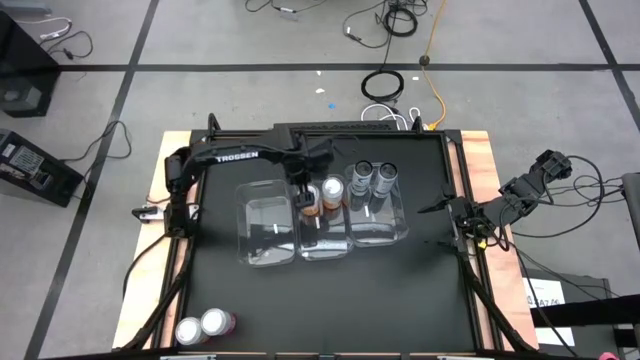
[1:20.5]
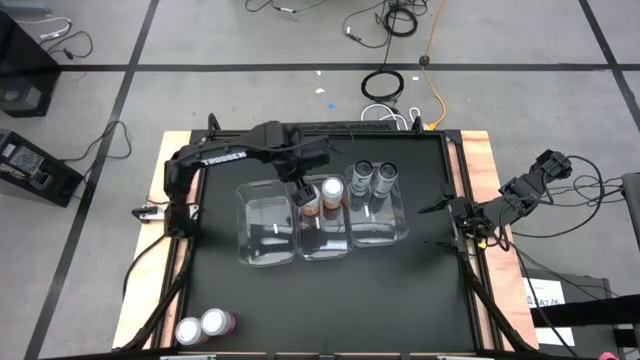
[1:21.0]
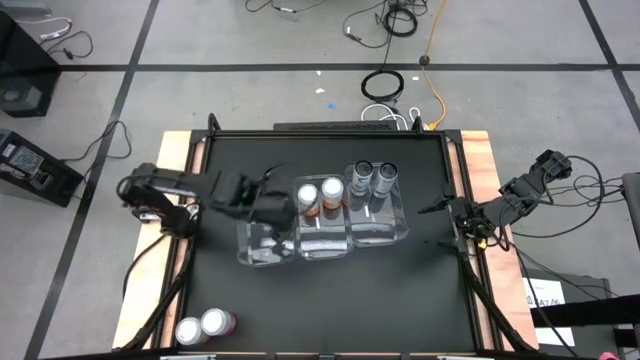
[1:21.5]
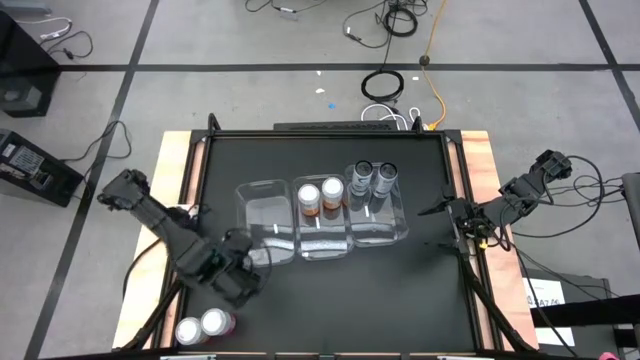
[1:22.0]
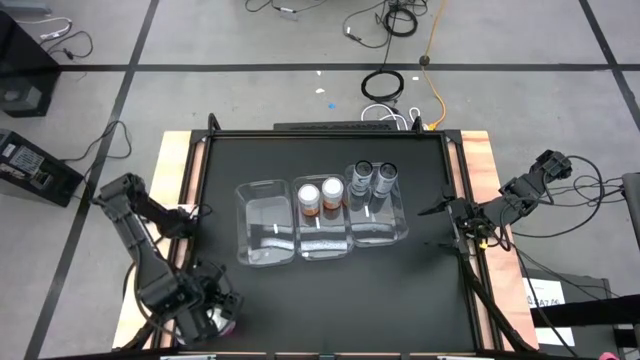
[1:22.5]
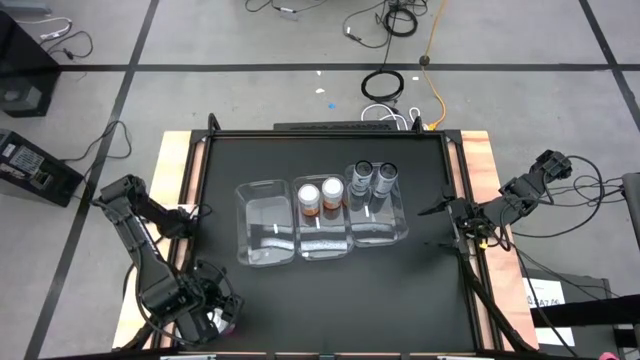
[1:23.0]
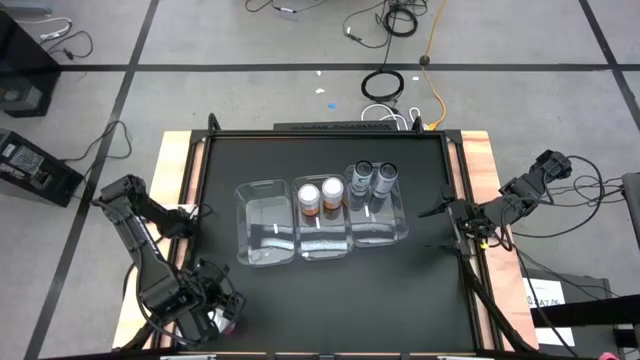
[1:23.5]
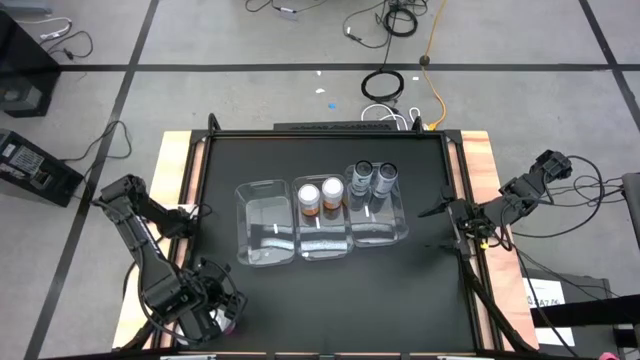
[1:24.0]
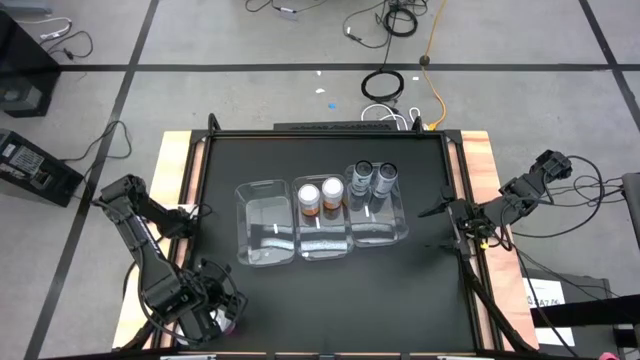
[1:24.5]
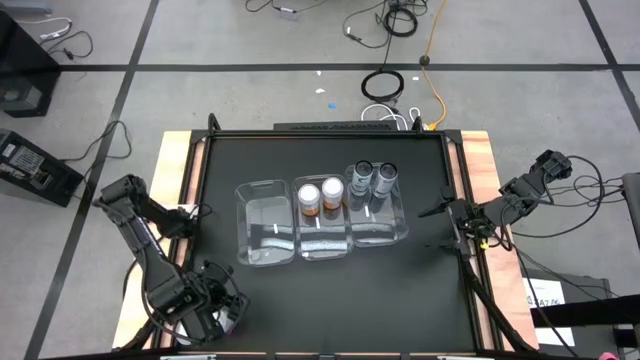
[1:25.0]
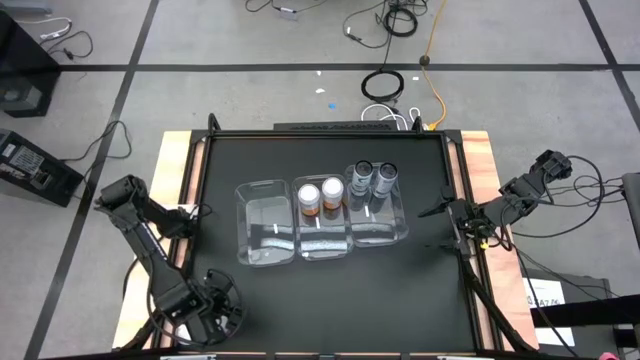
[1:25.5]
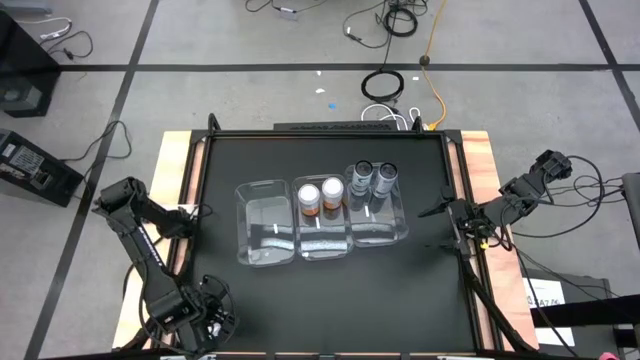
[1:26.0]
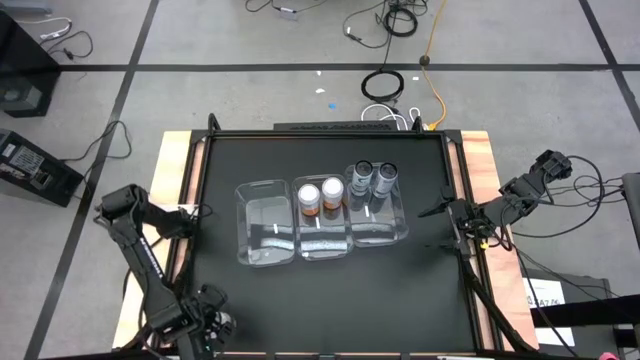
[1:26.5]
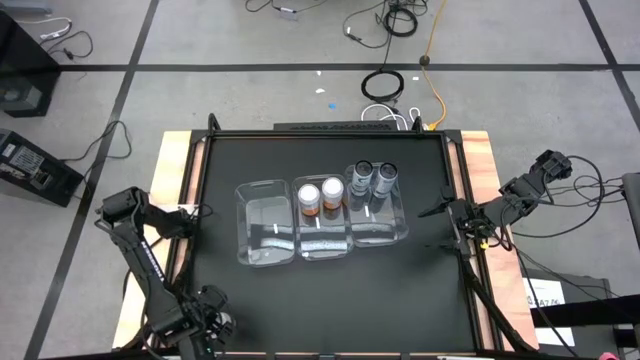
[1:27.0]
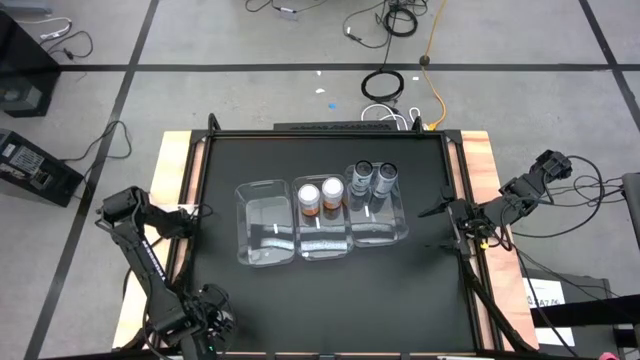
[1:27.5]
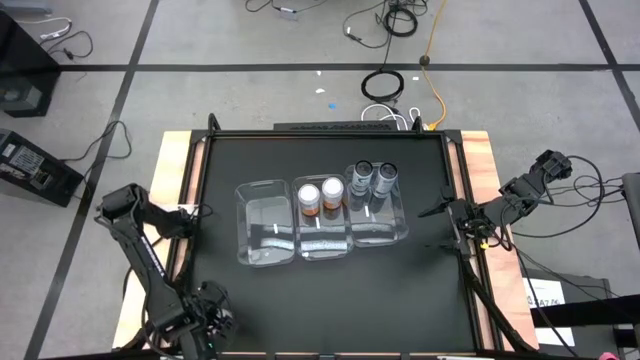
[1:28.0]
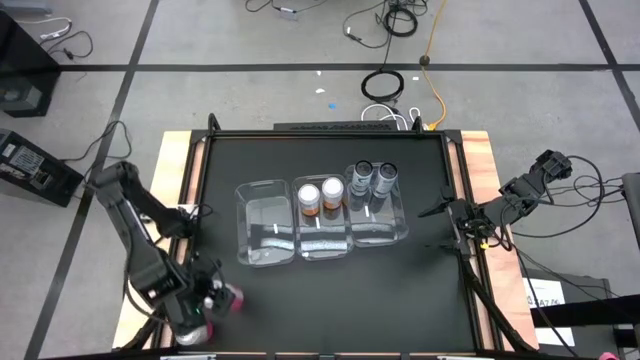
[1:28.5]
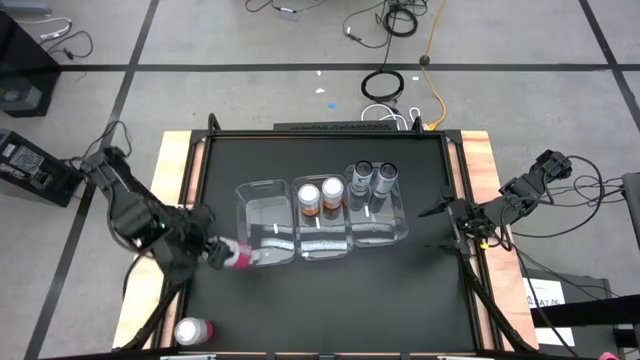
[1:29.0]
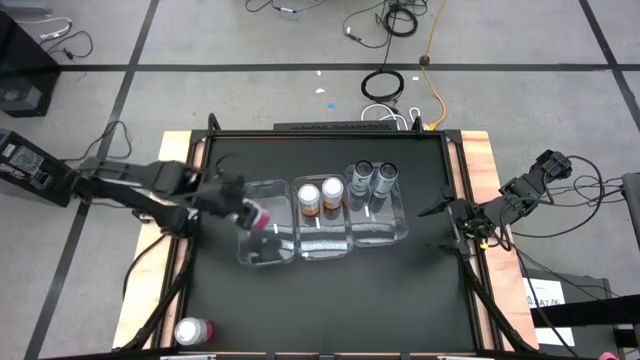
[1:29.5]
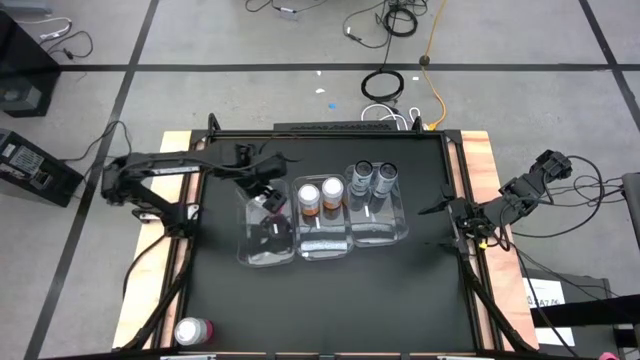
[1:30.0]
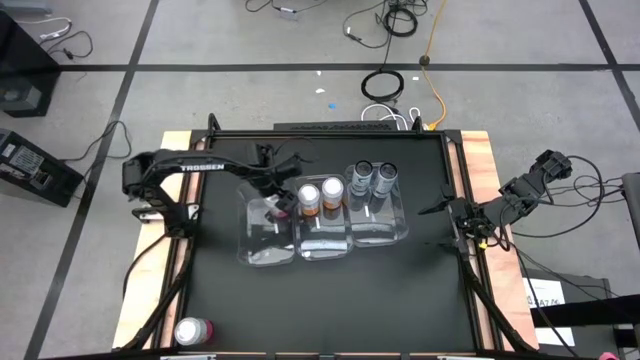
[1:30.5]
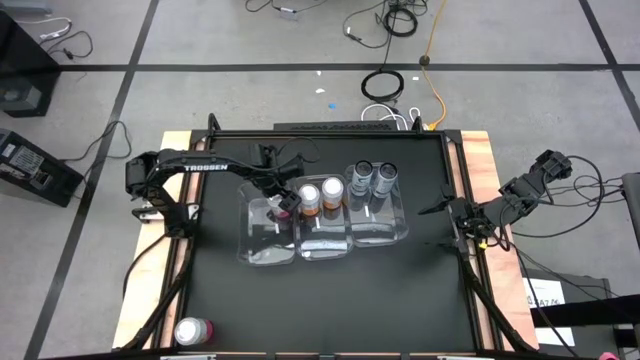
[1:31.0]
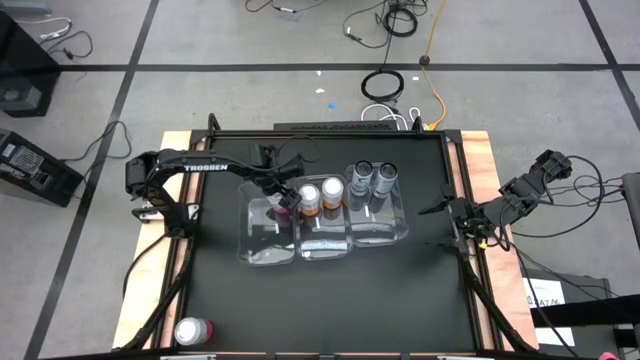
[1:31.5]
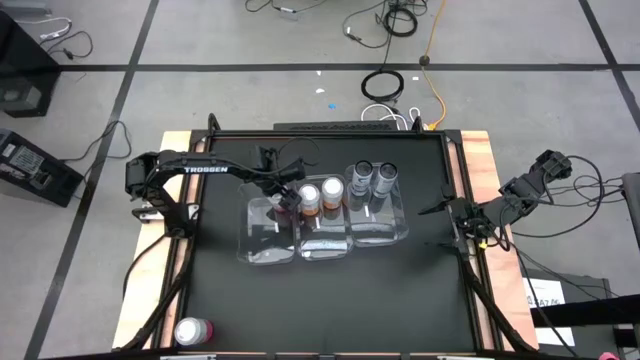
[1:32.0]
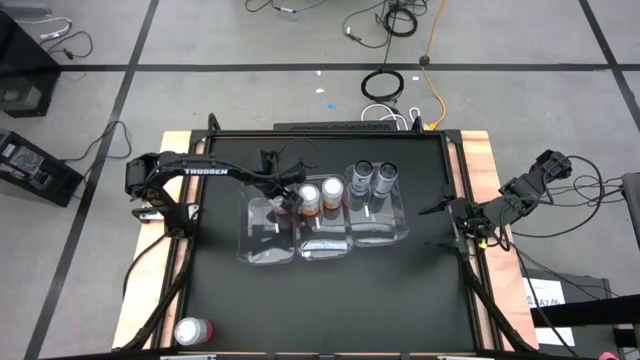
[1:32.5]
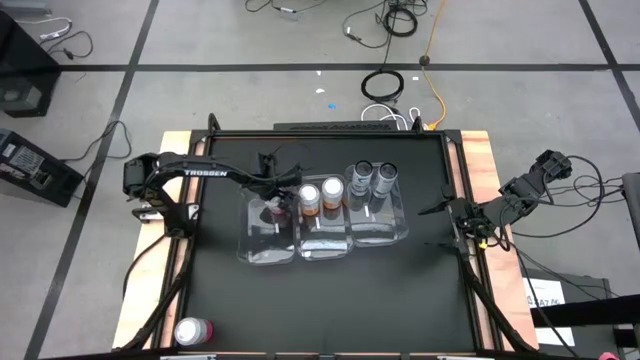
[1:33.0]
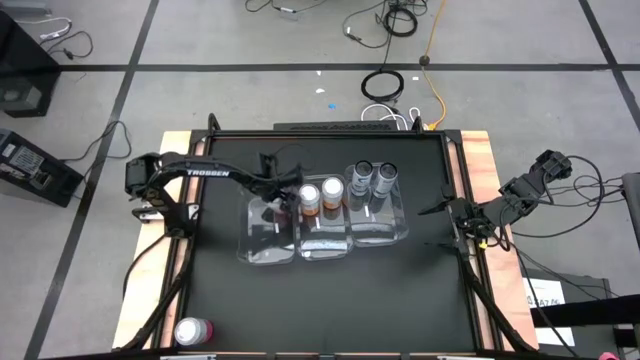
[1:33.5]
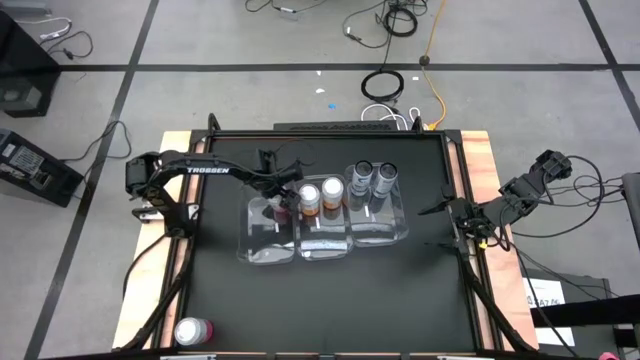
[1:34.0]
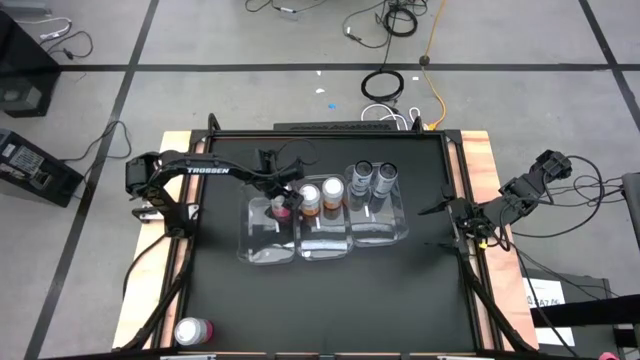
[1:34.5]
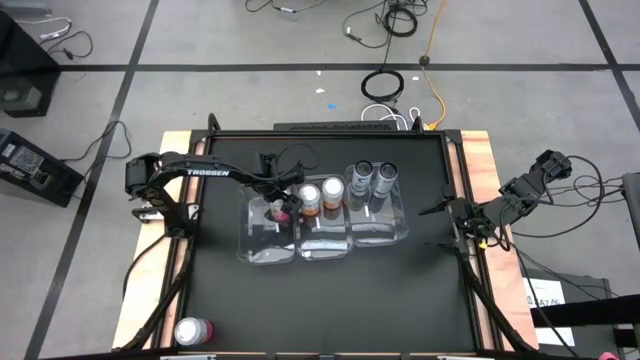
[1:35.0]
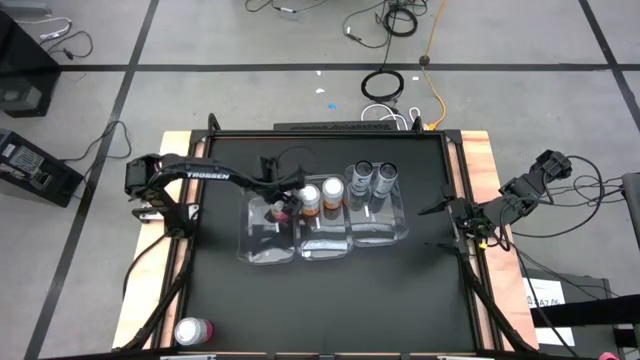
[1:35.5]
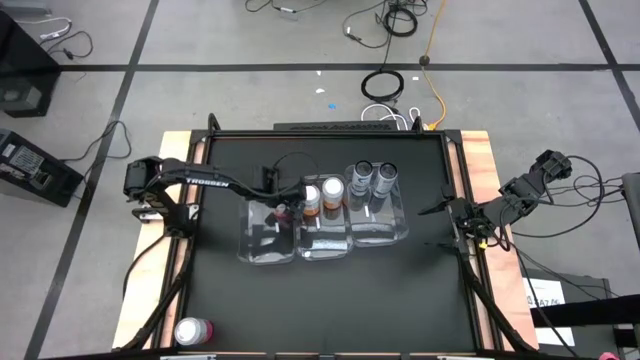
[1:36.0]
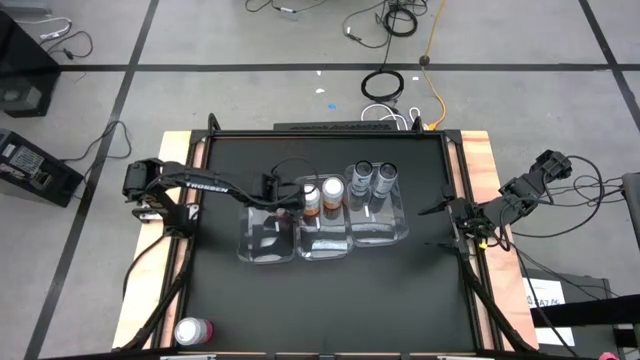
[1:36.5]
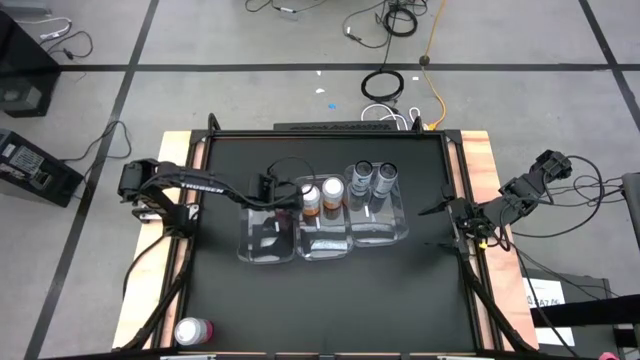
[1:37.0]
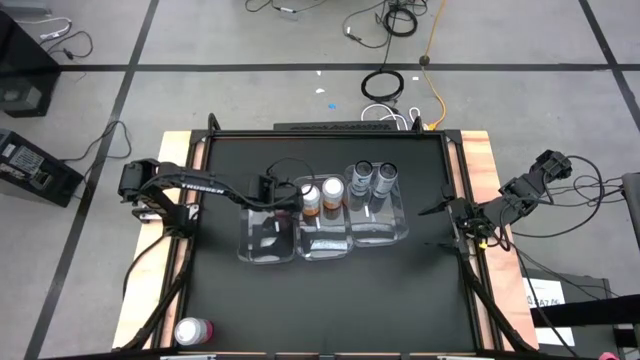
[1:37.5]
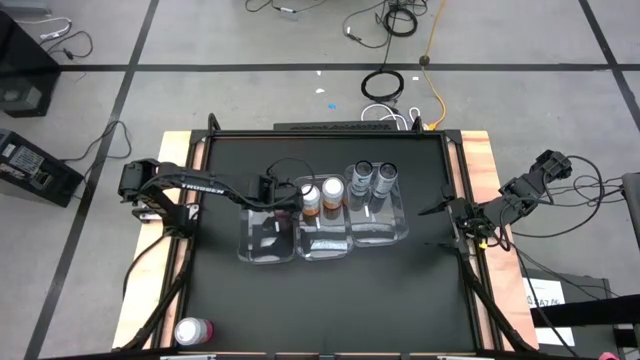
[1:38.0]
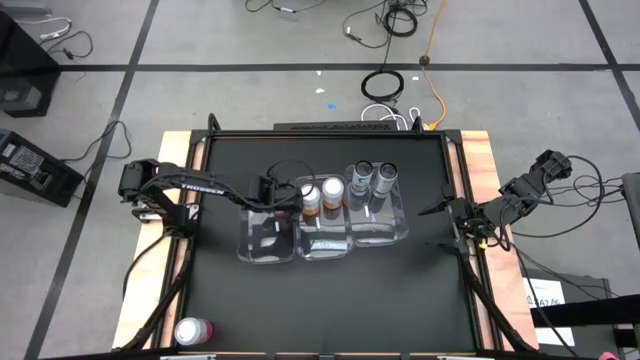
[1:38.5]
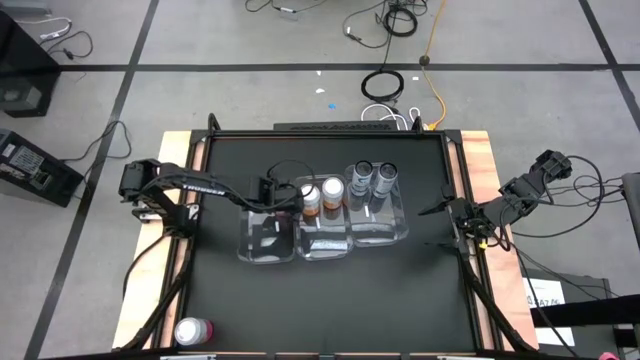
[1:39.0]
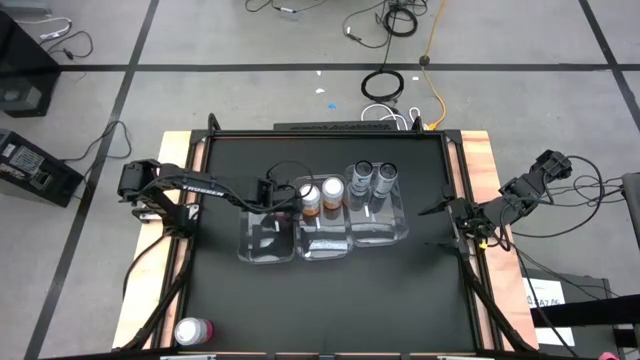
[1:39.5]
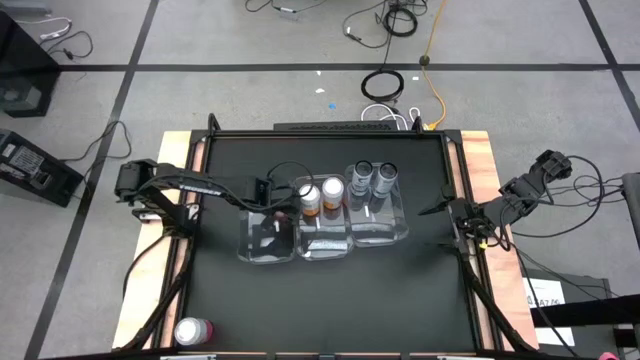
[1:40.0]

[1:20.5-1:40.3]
Task: Sort soda cans
Put the right red soda can into the left transparent bin

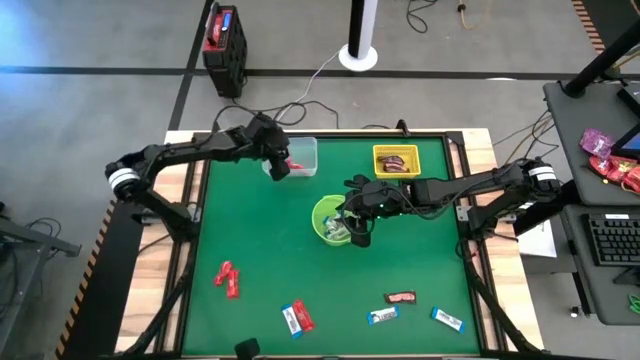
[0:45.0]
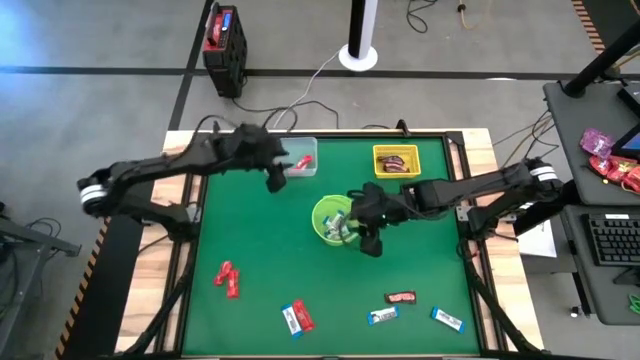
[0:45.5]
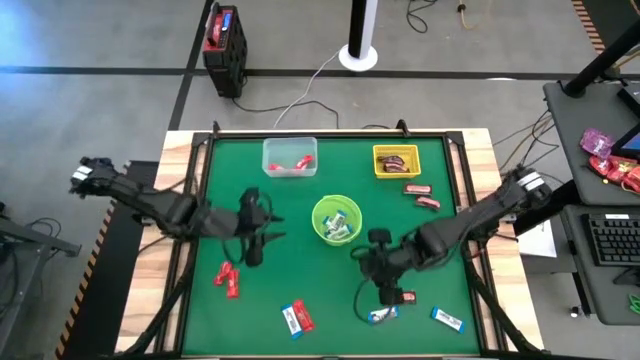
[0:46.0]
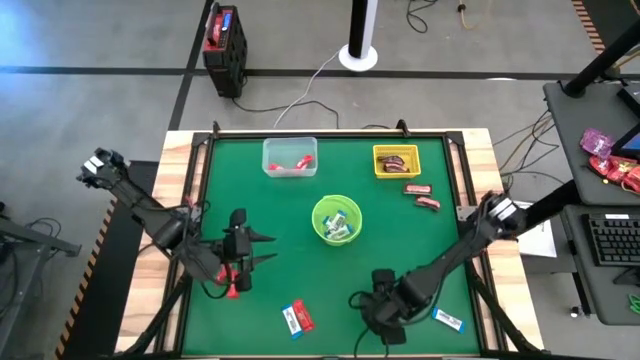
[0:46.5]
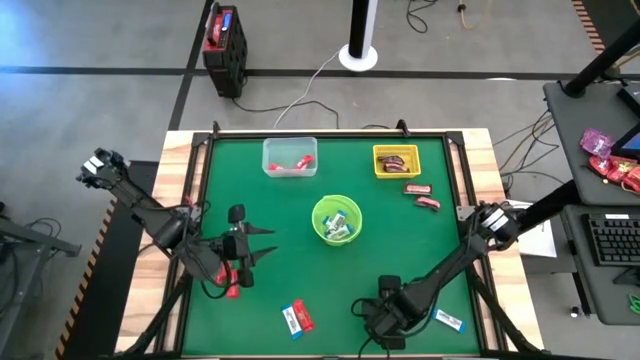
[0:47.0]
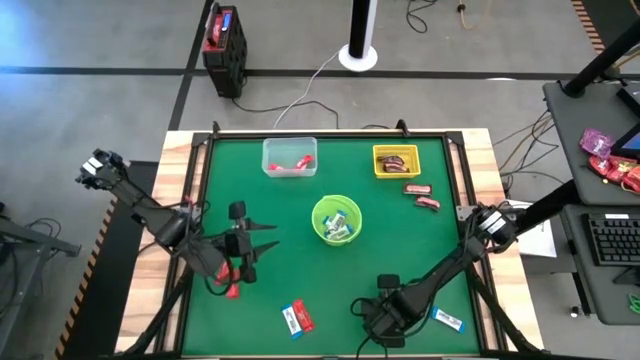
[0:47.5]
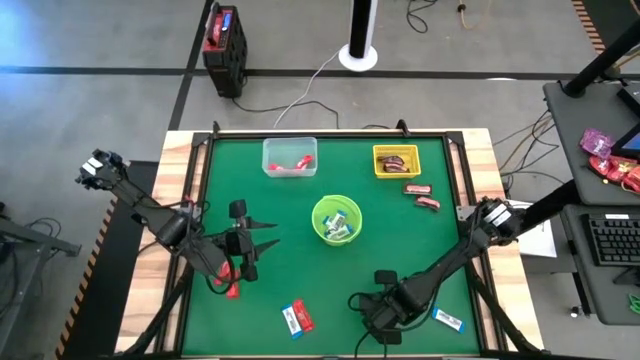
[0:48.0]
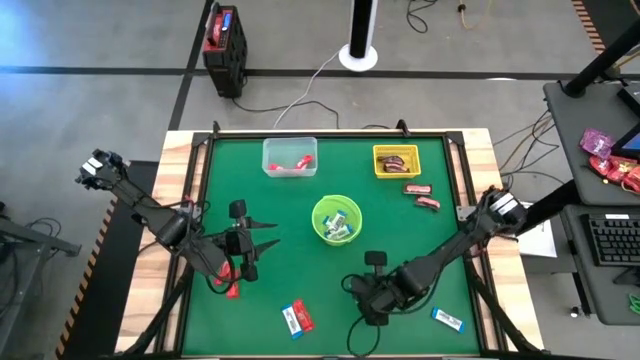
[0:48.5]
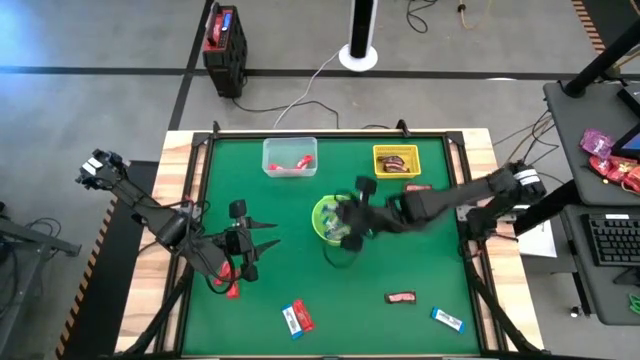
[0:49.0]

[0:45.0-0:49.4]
Task: Sort candy by brand, put in halloween buckets
Put the white chocolate into the green bucket
